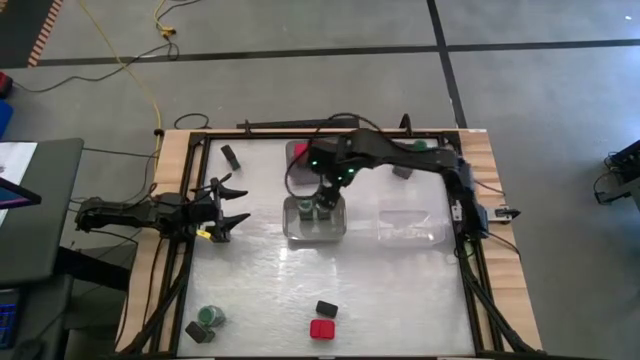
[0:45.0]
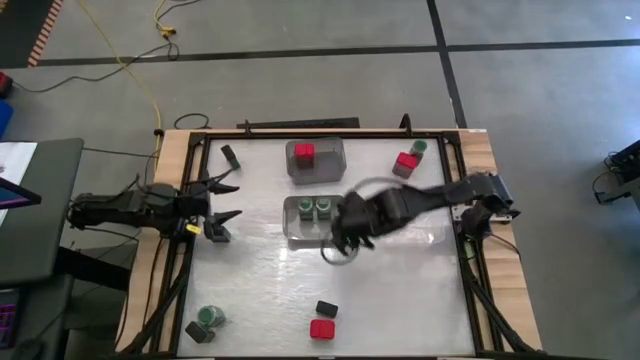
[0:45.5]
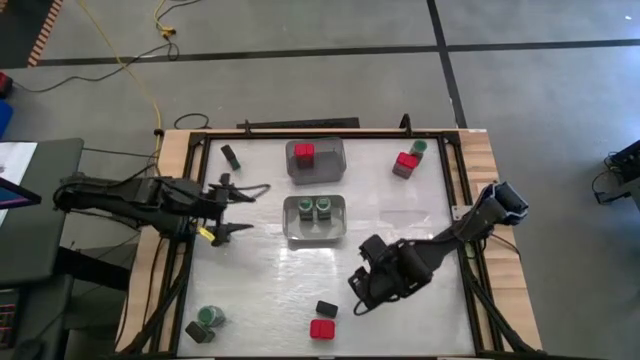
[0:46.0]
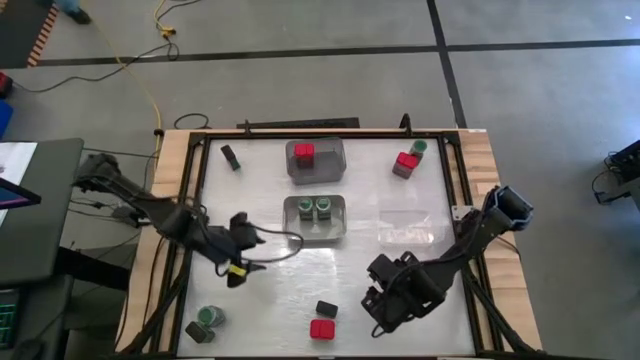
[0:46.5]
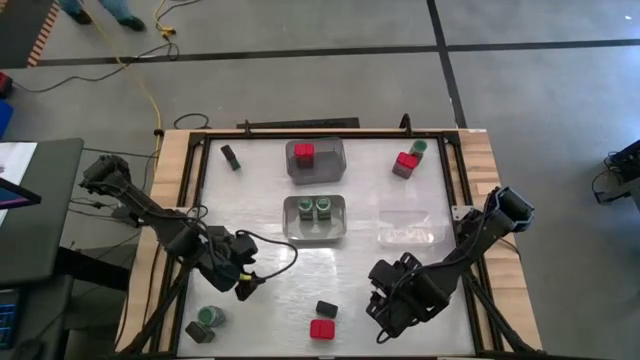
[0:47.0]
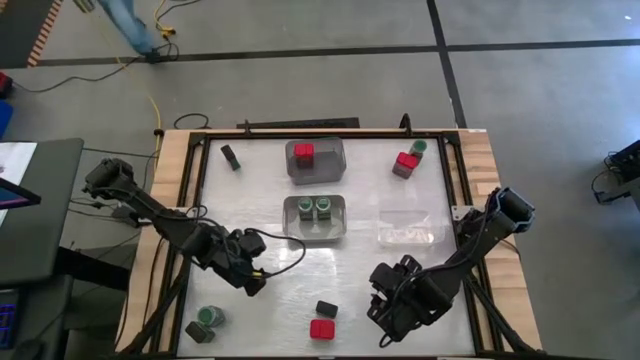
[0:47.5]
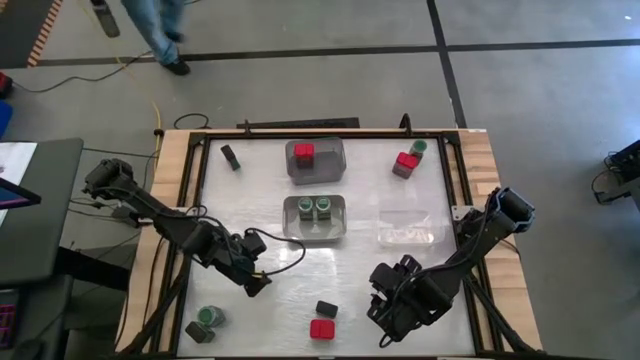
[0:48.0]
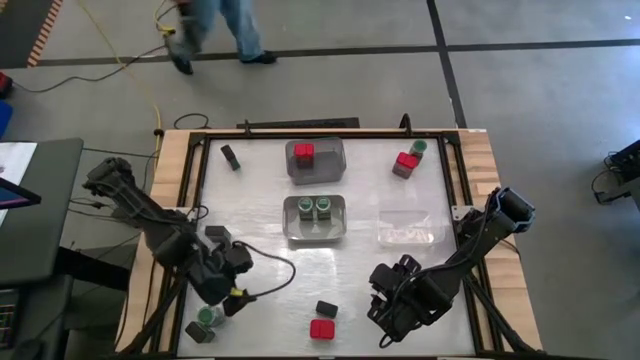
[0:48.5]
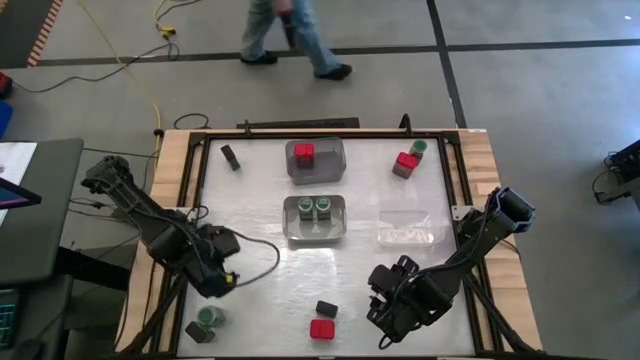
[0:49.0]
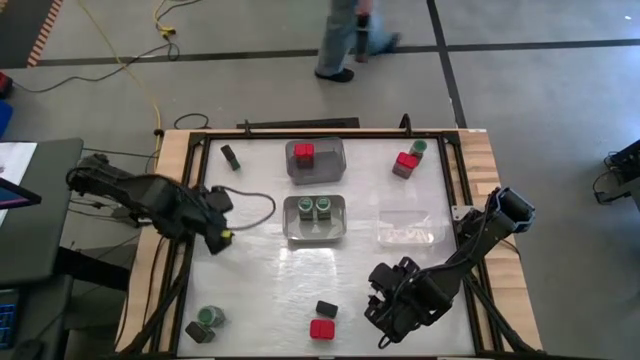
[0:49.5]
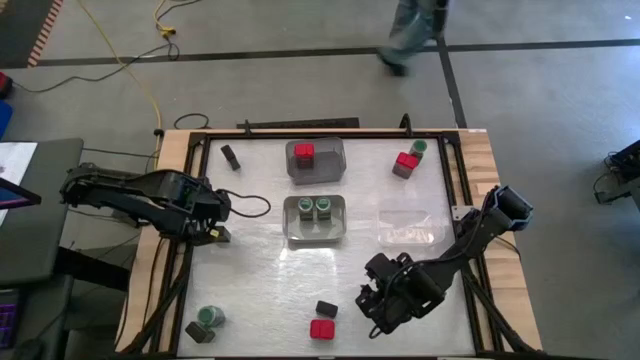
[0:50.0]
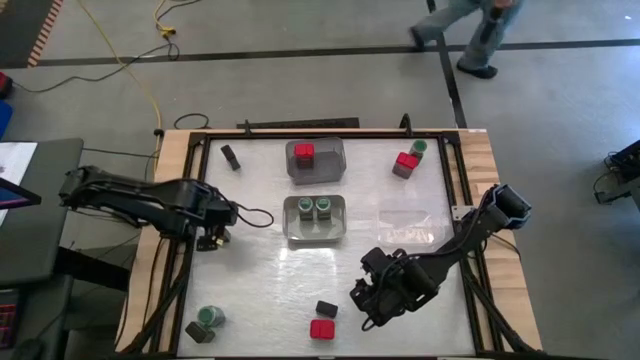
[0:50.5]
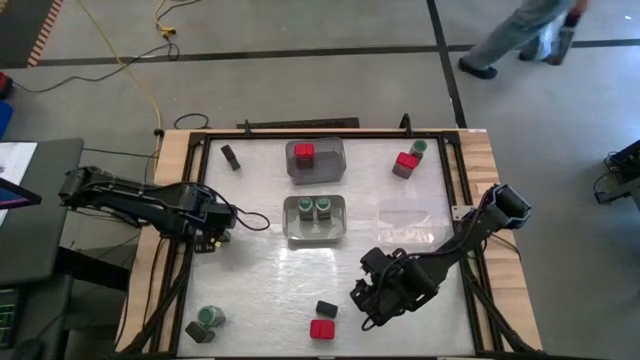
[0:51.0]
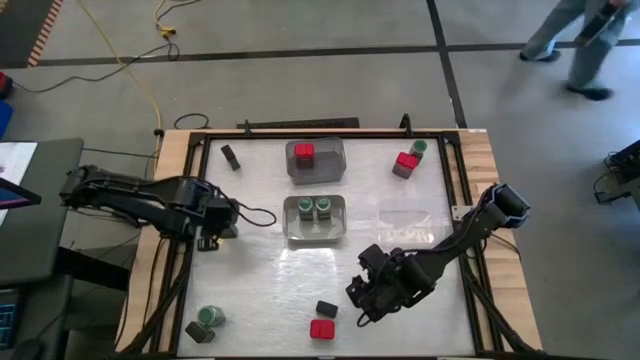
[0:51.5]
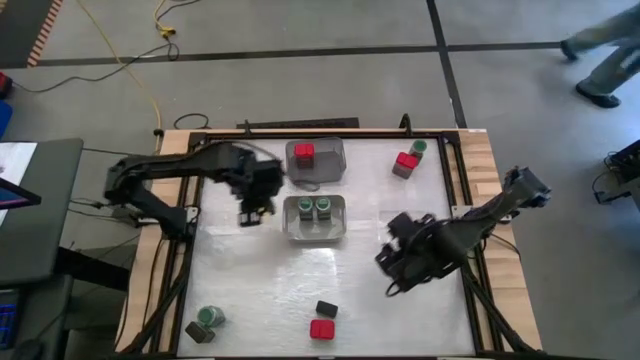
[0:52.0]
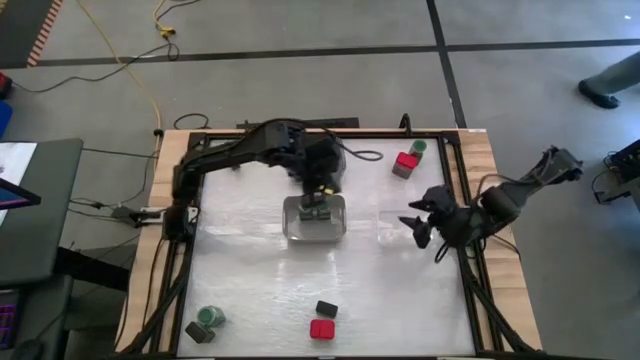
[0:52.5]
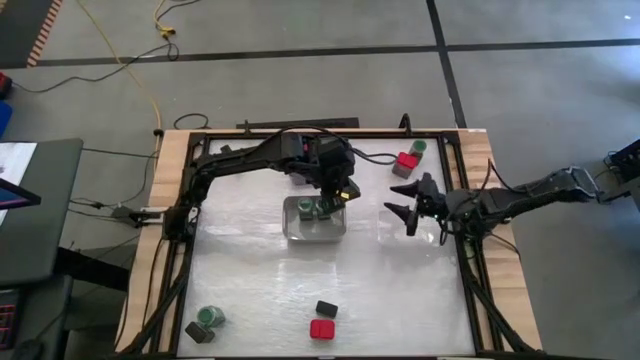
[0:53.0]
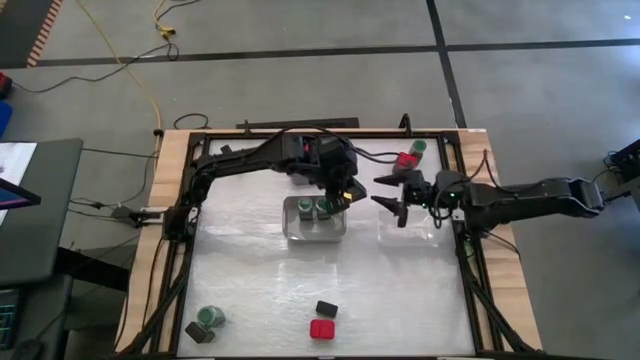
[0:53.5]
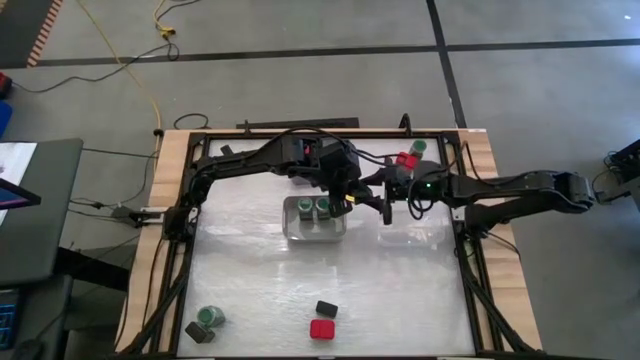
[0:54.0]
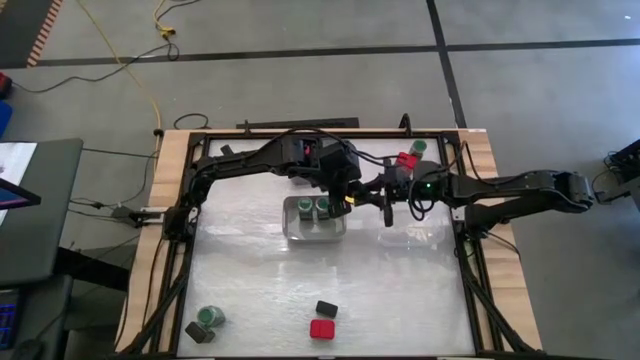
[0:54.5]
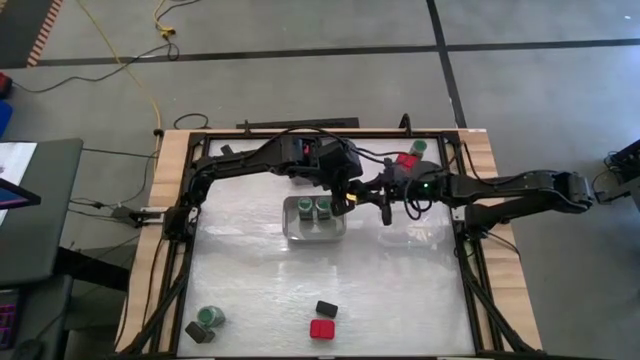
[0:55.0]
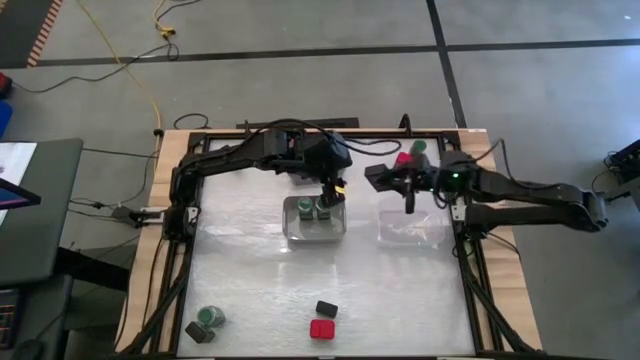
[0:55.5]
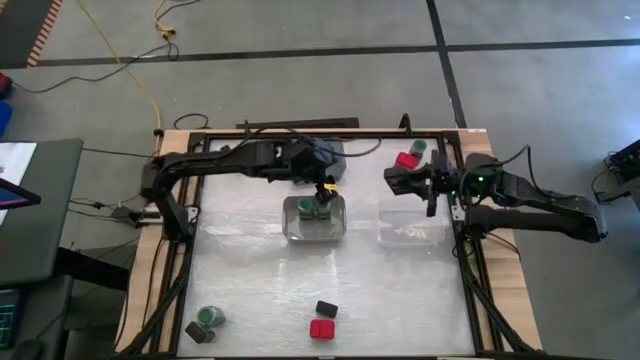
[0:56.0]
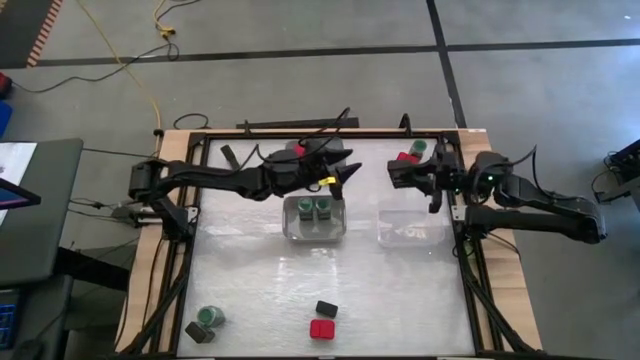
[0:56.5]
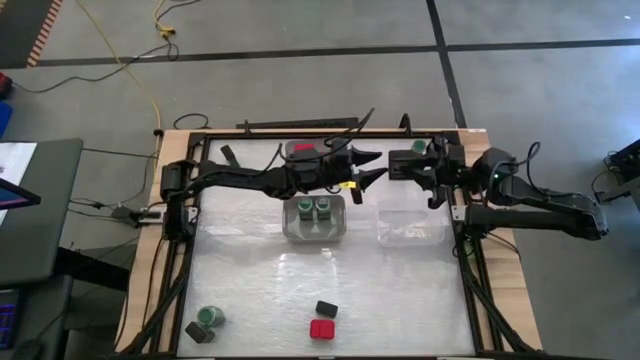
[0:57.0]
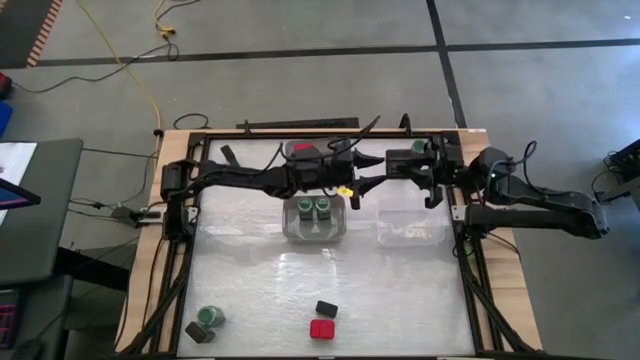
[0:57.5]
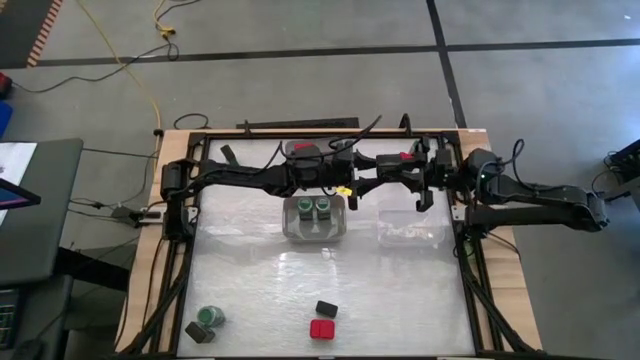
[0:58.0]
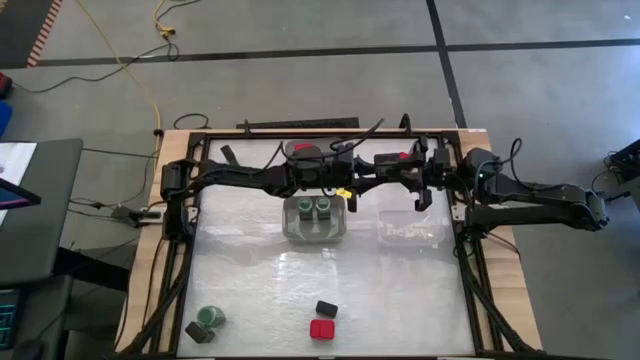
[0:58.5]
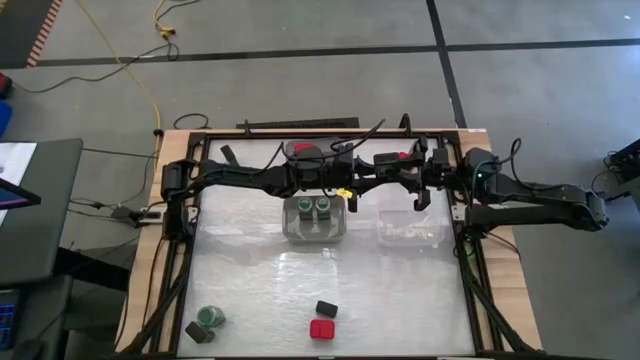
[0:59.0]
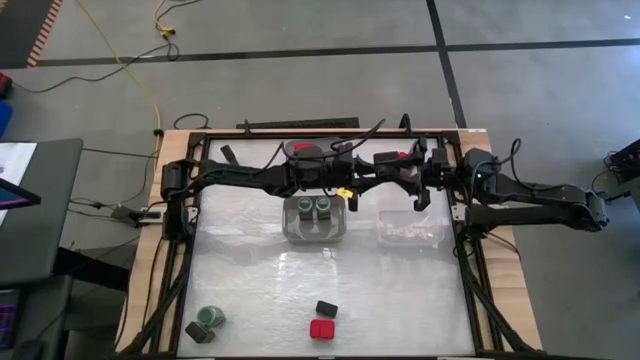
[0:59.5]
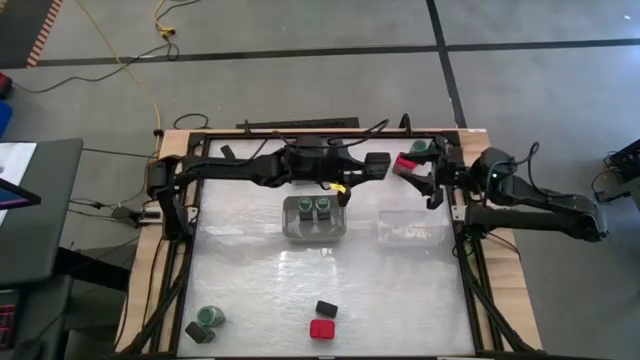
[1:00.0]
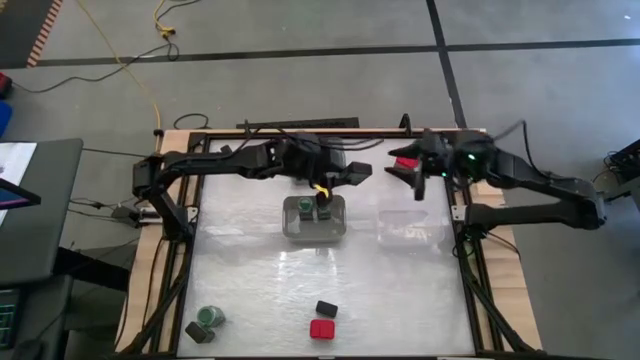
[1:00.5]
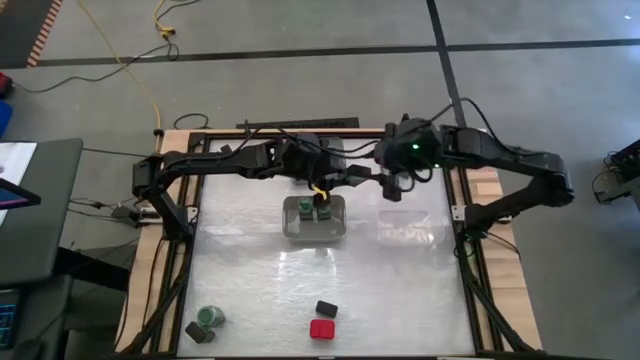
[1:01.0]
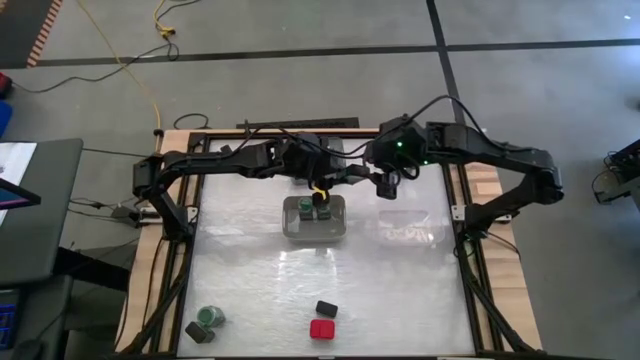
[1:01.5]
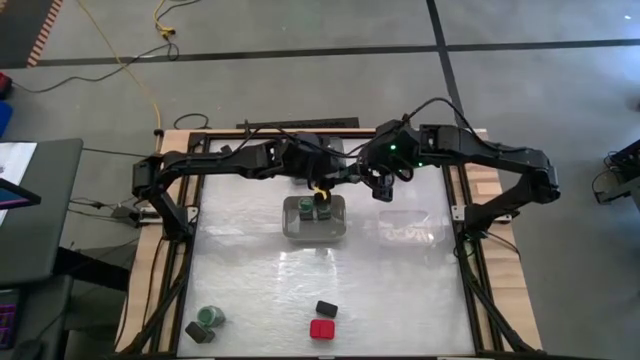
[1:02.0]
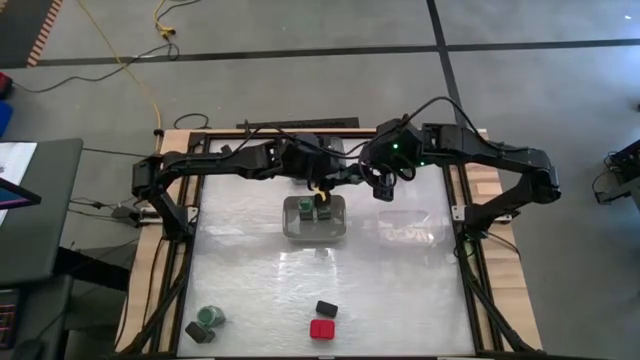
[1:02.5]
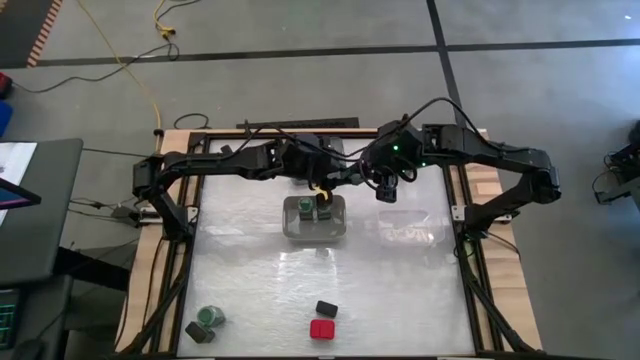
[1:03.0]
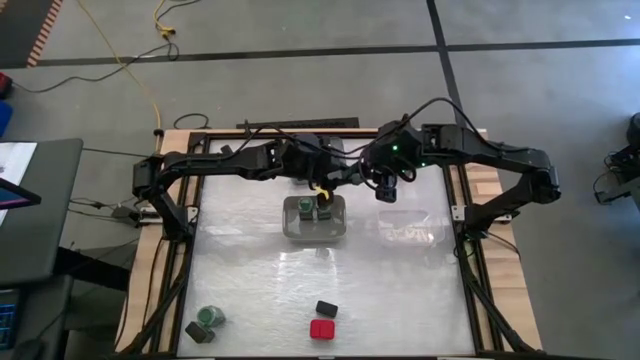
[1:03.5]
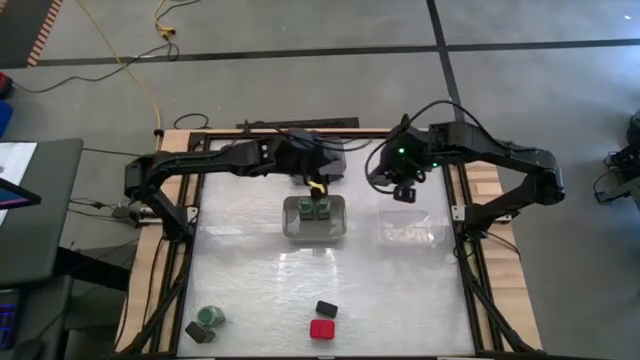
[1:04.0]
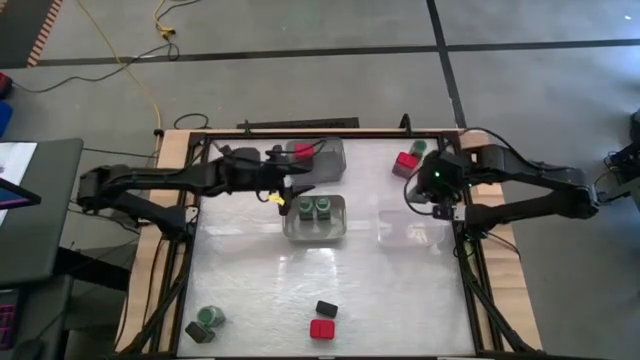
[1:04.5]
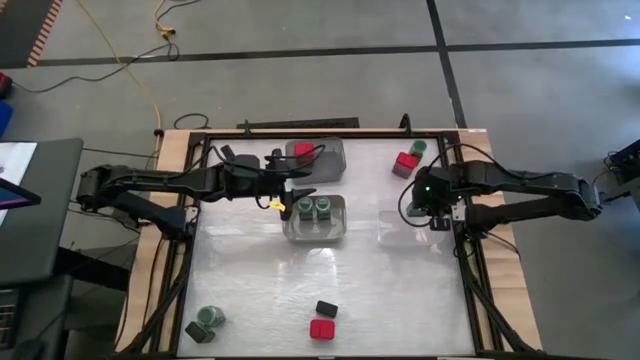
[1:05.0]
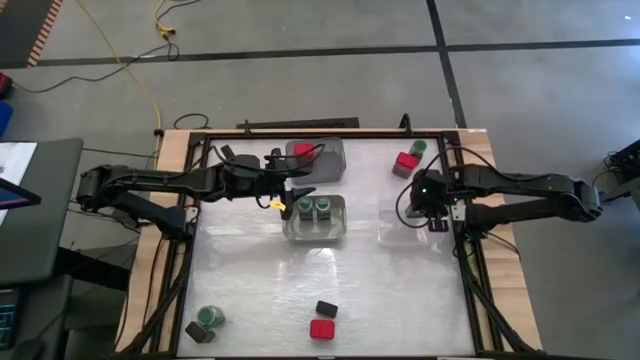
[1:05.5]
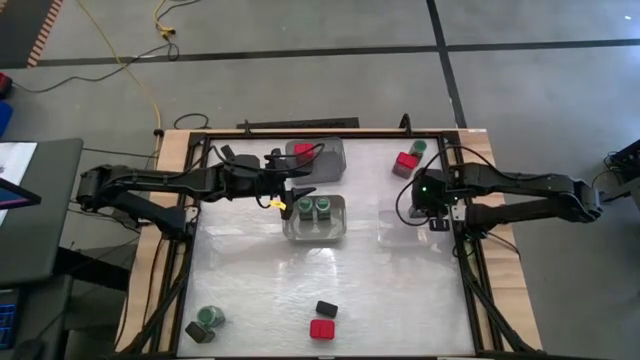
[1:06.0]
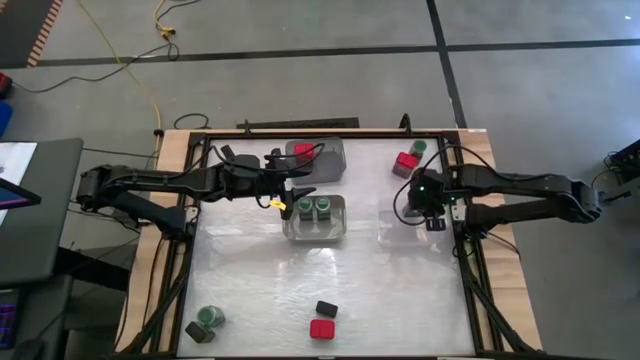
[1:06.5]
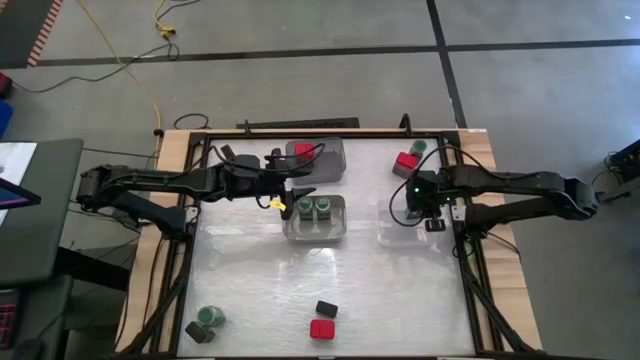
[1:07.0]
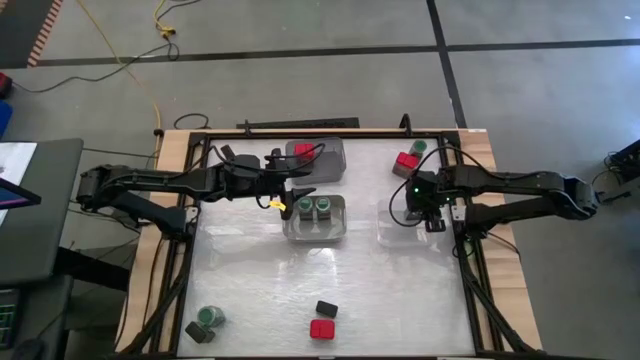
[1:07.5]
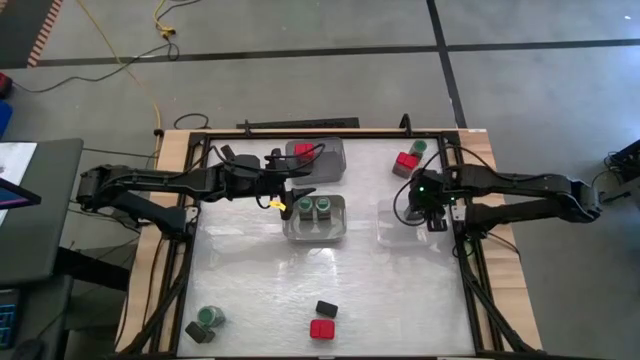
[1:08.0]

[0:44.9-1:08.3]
Task: Sort spices by type
Put the black spice can into the transparent bin
